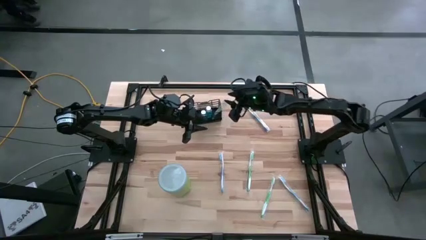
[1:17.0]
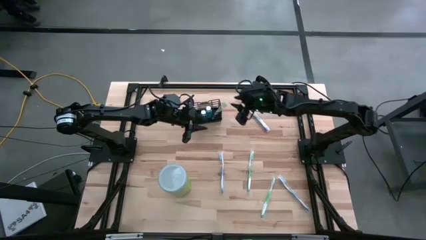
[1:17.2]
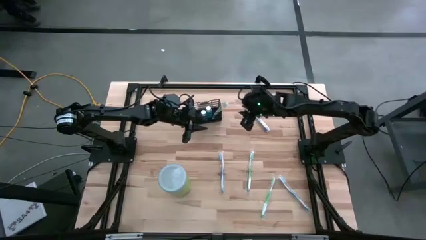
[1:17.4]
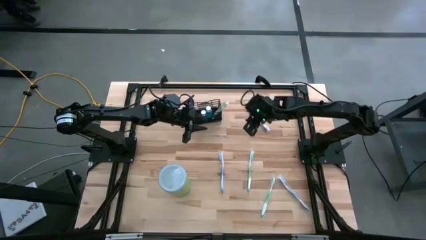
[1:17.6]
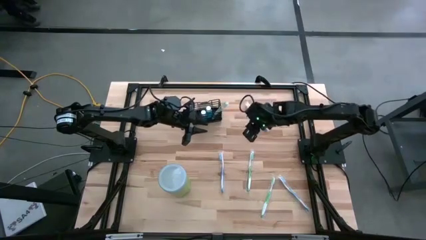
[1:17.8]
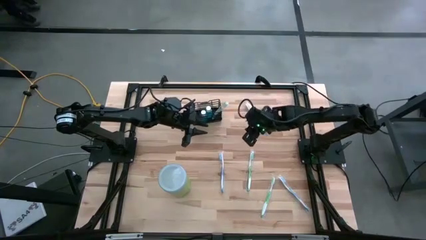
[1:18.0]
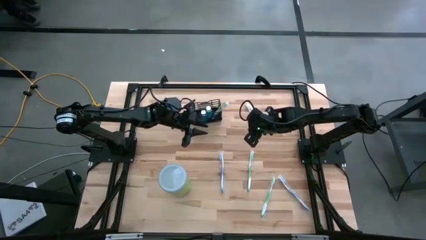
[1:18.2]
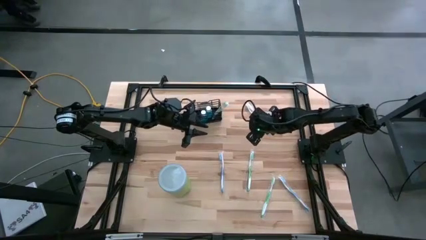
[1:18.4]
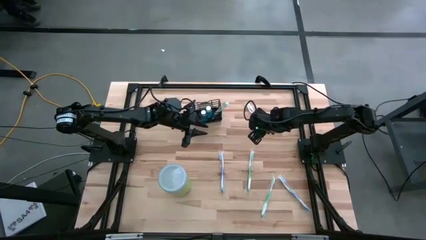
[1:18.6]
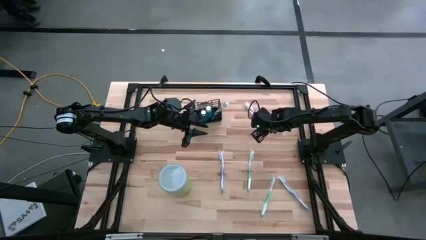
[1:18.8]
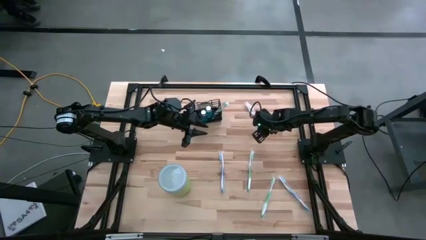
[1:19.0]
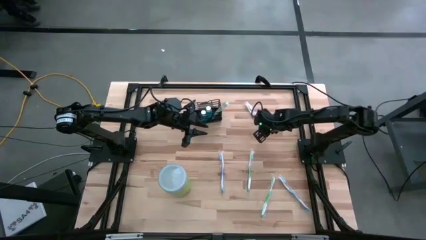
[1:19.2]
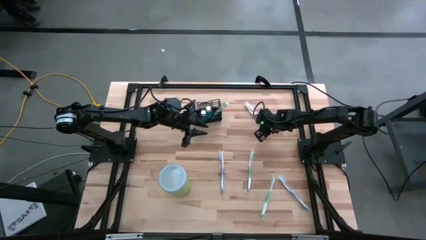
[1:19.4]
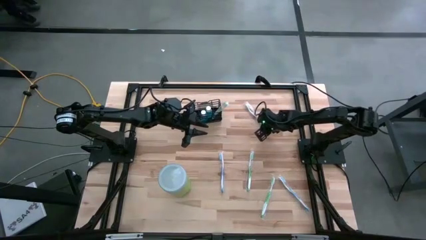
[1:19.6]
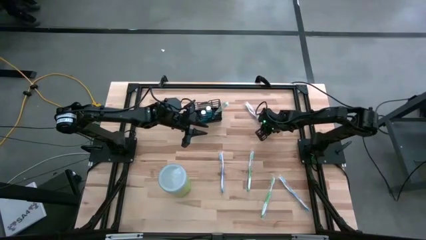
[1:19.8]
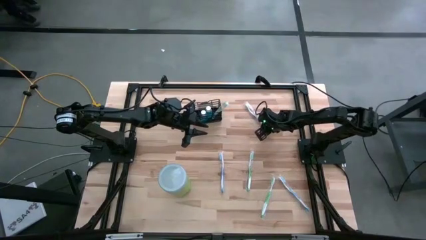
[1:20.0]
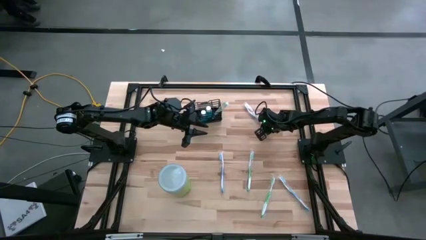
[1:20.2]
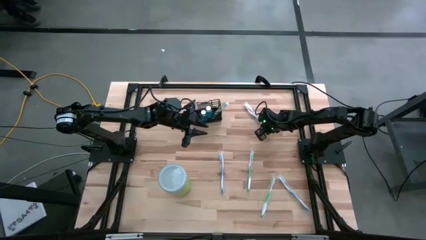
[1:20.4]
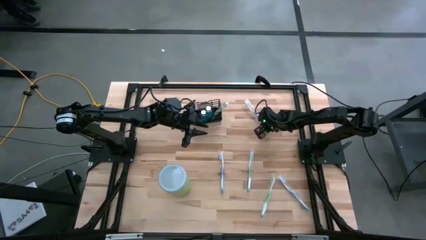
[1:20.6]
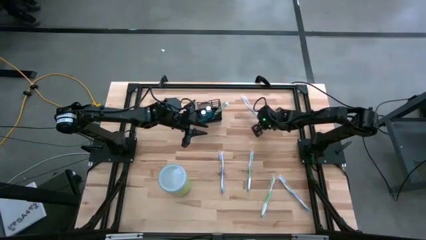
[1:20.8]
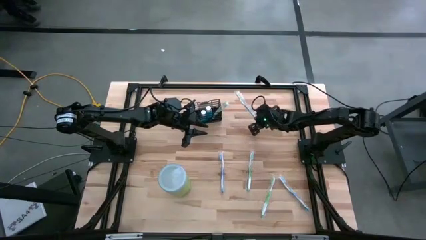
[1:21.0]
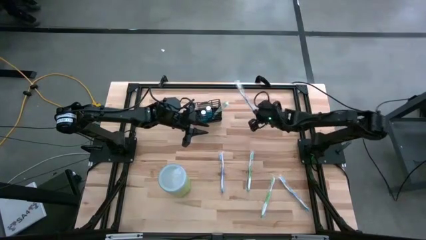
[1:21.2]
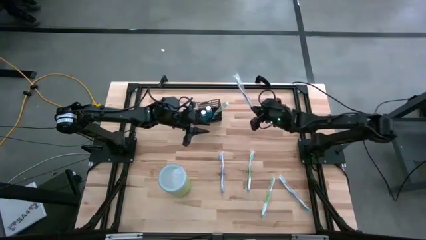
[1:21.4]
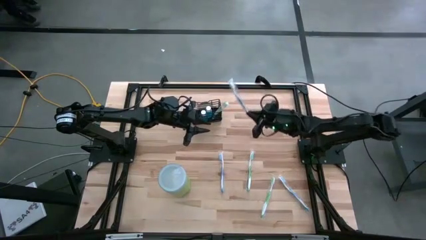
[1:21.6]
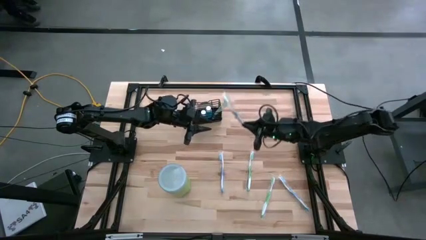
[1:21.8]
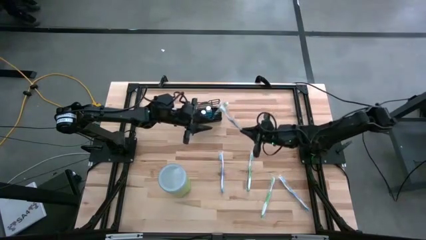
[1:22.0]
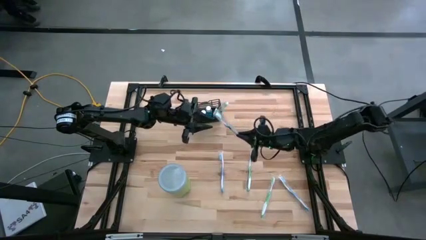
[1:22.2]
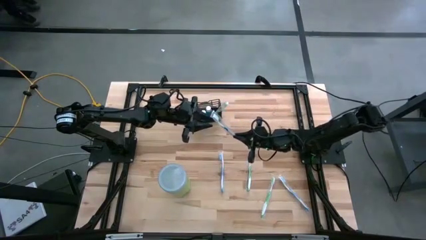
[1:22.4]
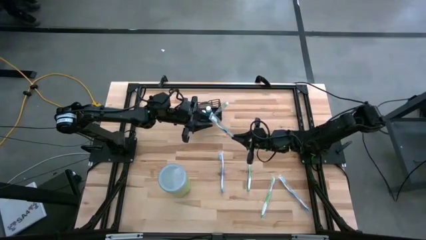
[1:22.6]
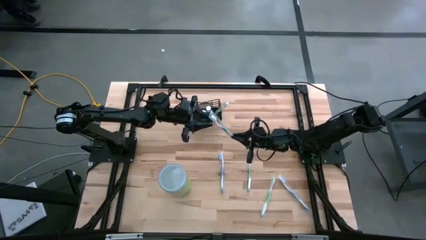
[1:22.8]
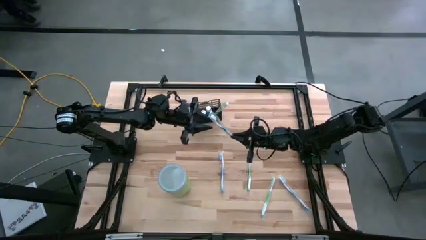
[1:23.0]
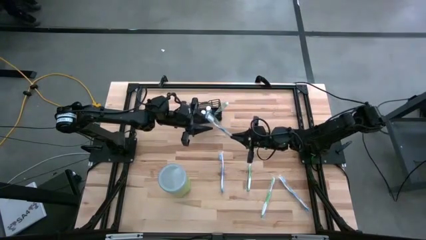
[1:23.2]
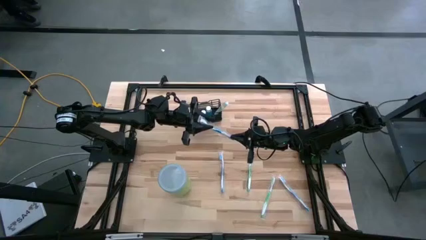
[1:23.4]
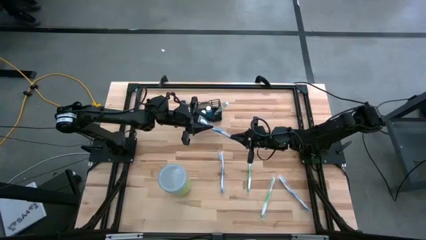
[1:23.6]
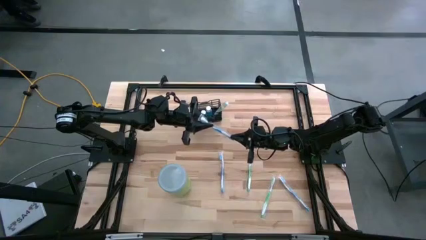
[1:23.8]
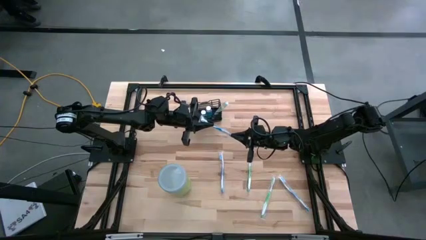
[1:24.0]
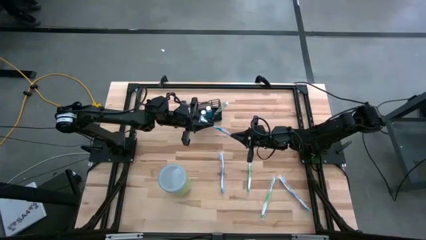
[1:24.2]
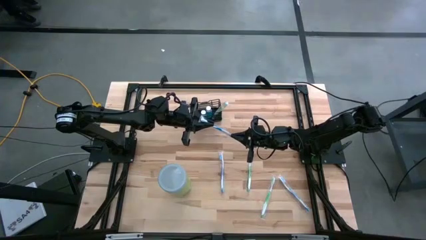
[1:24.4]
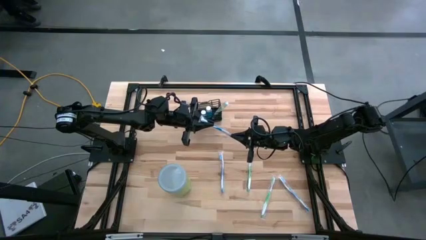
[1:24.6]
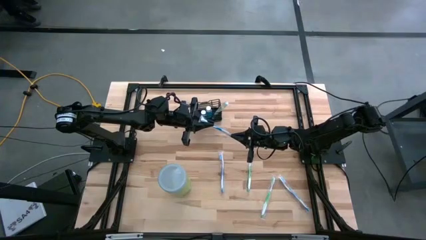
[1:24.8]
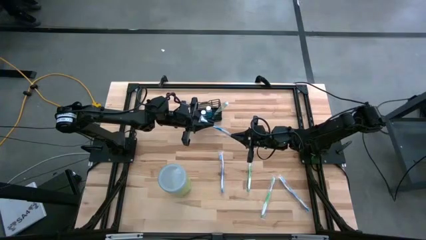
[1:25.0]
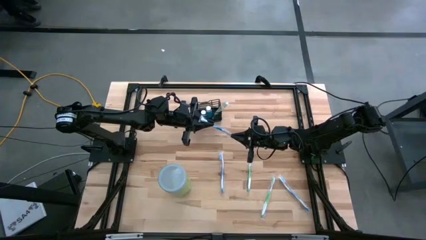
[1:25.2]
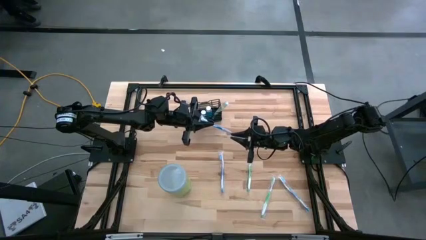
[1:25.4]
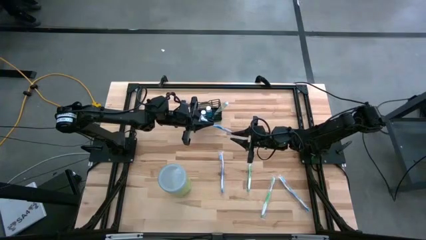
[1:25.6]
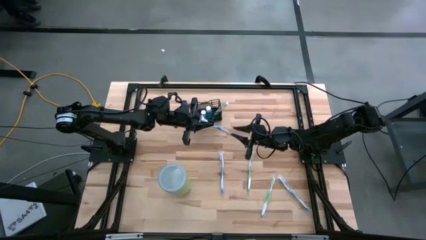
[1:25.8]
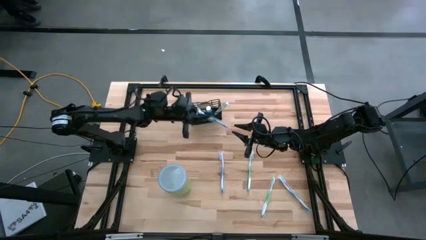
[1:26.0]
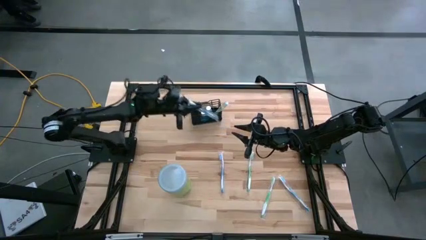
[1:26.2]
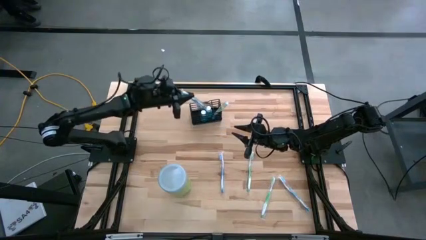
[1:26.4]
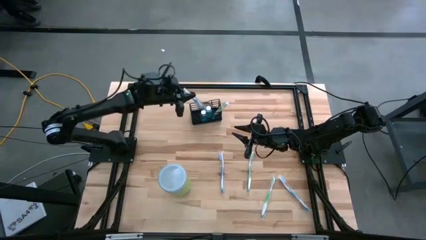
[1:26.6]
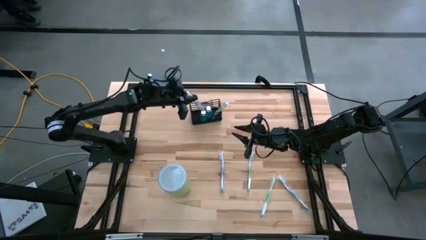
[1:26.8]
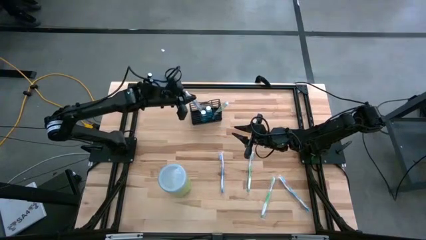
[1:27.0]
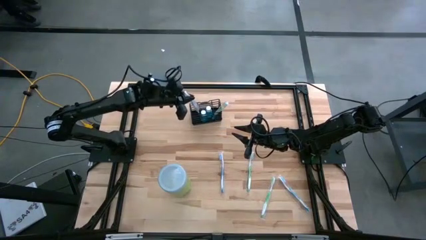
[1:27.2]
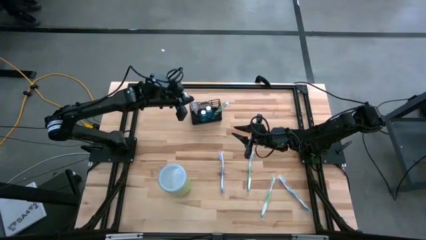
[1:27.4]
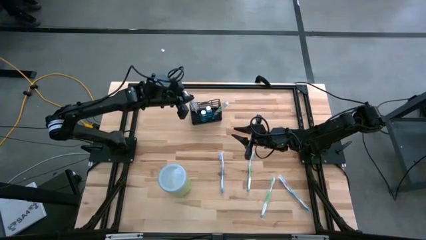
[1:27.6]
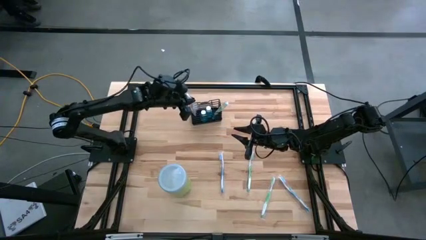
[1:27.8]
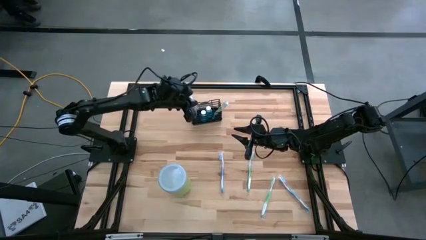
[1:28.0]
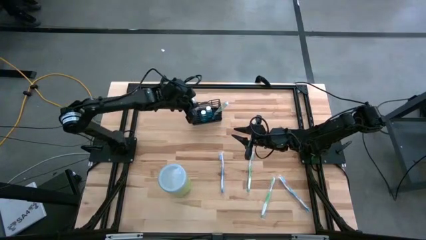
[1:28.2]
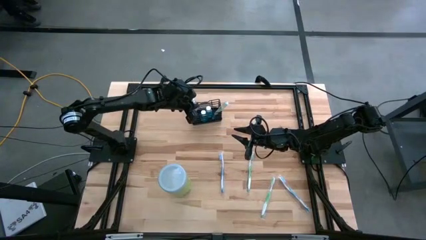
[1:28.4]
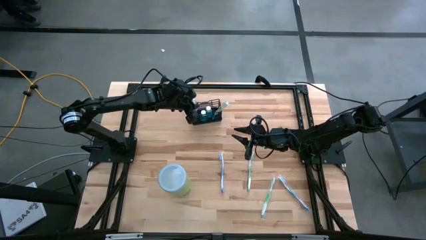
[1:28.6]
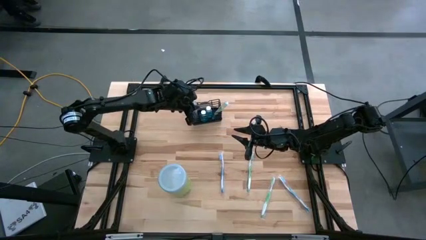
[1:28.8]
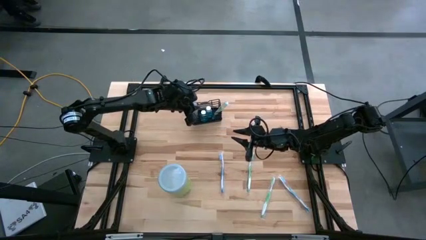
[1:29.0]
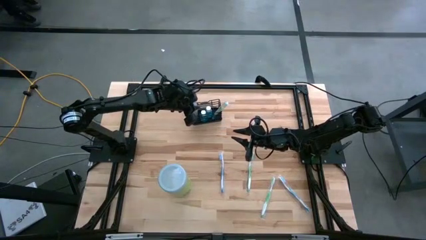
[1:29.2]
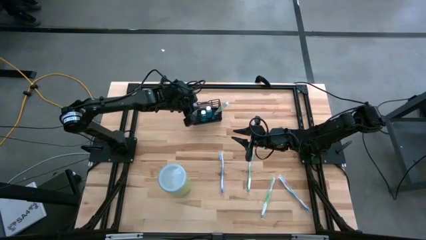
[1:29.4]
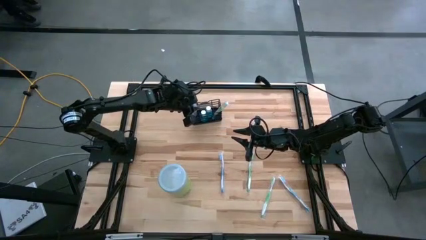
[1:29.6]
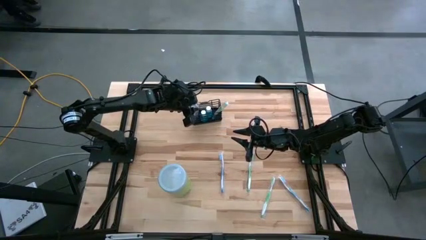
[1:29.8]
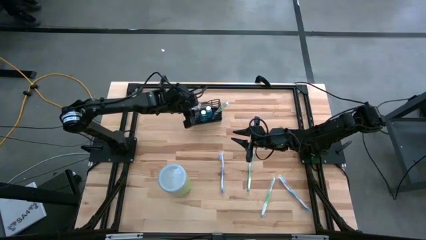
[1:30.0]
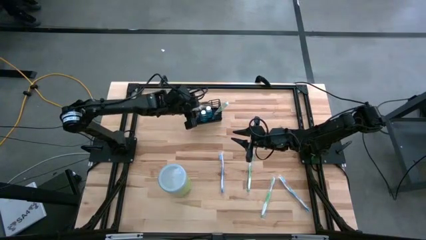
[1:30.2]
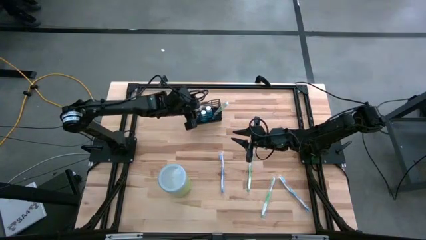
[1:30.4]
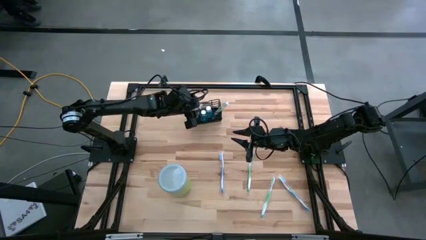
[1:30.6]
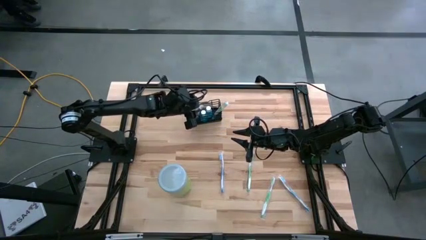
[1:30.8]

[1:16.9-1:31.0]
Task: Pick & Place toothbrushing station
Put the top blue toothbrush into the black mesh mesh organizer

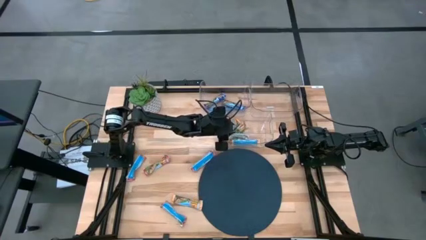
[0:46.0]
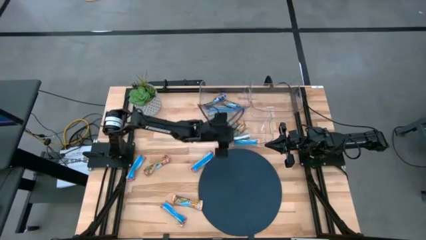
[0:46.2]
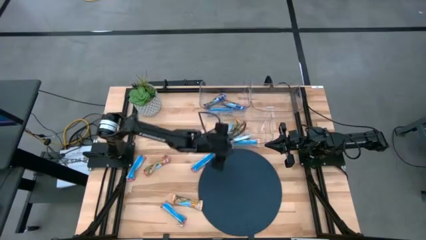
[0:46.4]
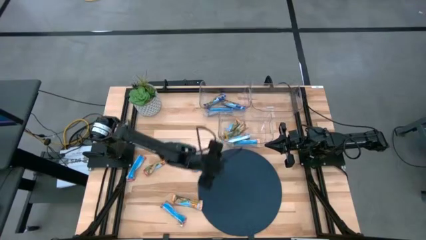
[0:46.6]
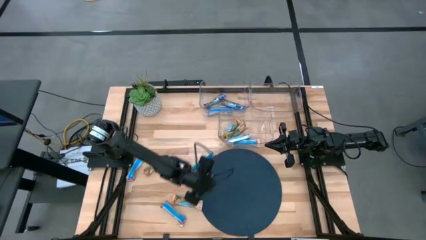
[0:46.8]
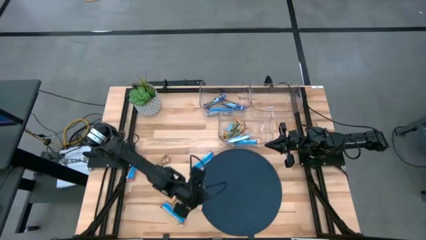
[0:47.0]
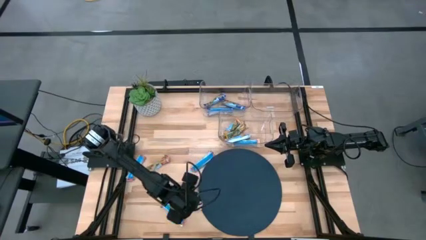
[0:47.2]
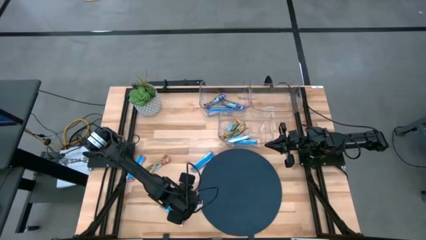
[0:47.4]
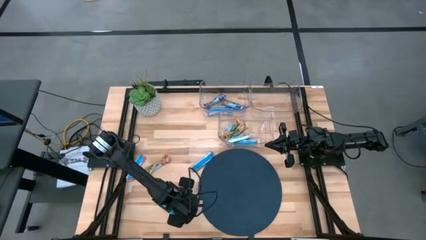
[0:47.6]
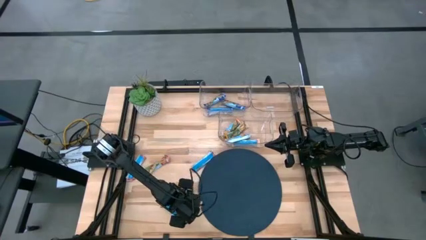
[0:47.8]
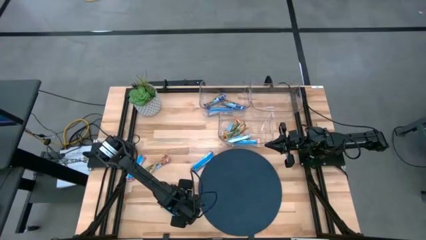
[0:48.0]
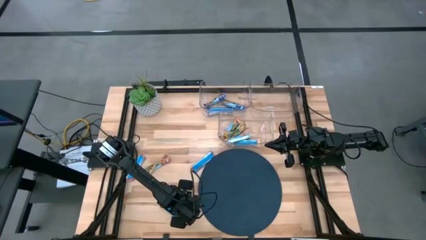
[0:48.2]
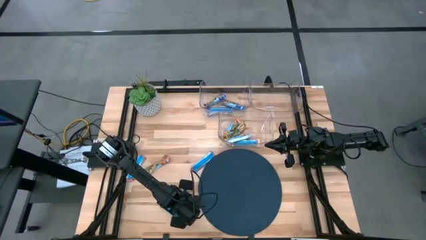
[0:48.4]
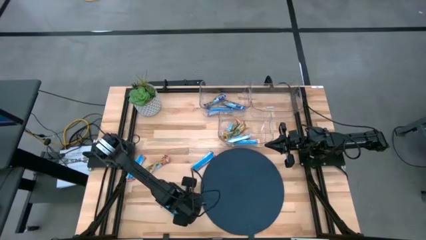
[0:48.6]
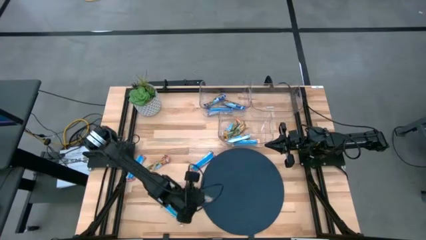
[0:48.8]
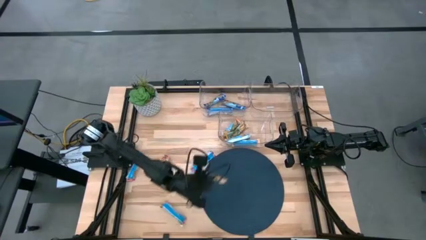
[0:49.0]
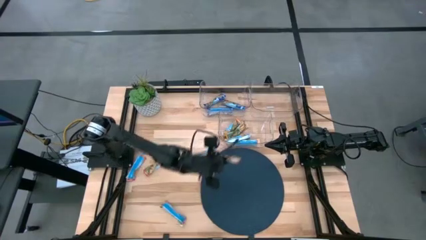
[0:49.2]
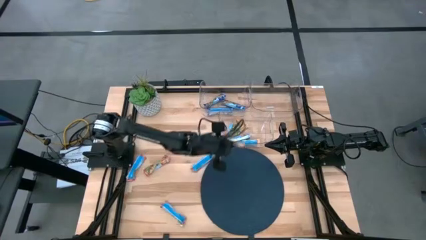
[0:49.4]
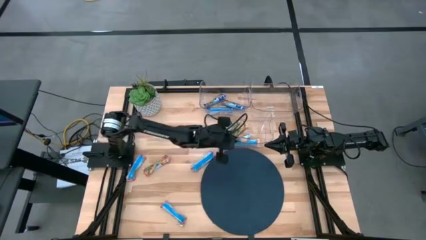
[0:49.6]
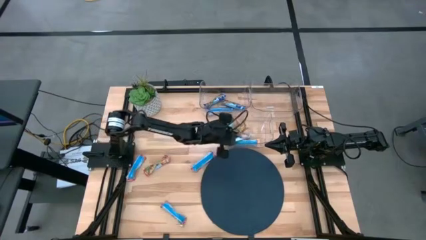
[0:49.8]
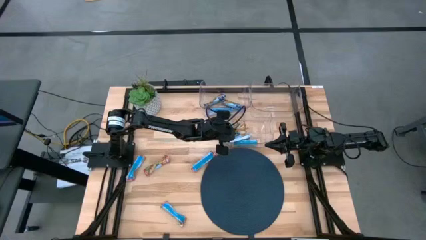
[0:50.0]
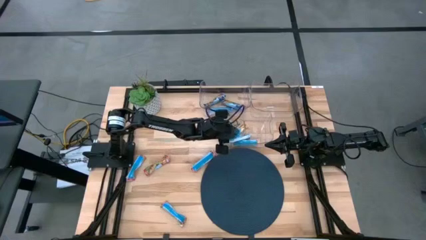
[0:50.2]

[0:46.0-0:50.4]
Task: Pick and place Granola Bars by type
Put the yellow granola bar into the bottom transparent bin
